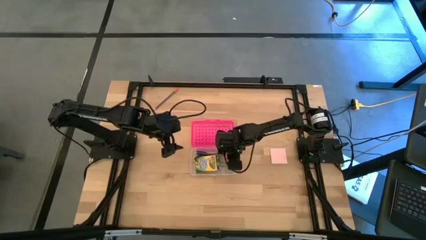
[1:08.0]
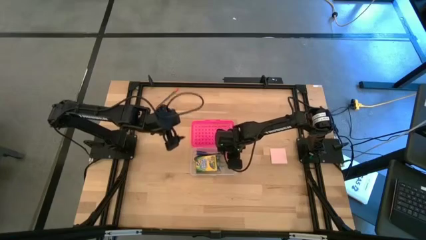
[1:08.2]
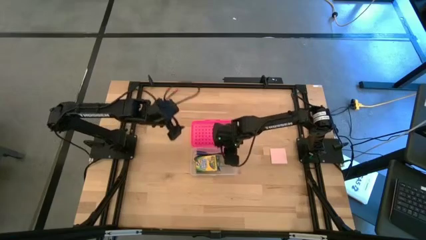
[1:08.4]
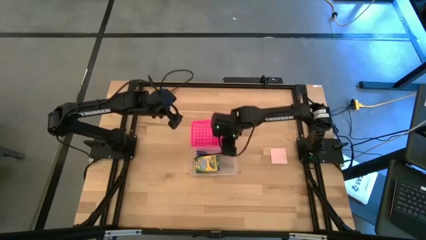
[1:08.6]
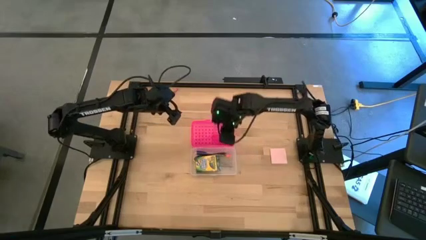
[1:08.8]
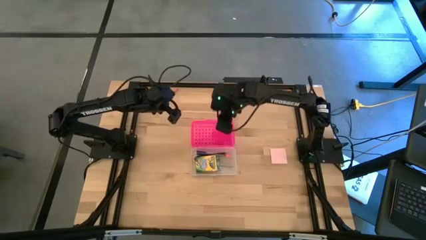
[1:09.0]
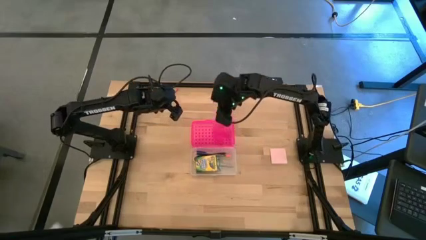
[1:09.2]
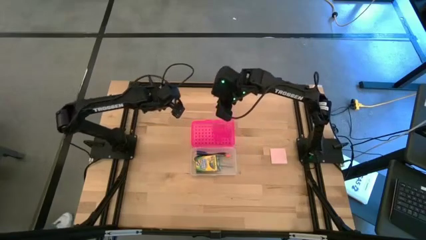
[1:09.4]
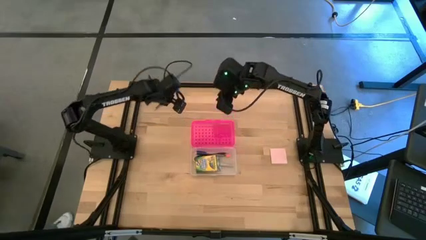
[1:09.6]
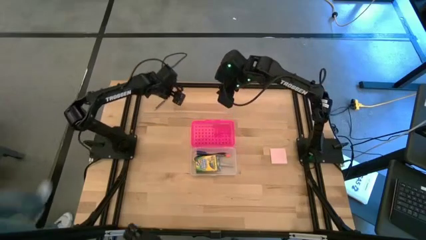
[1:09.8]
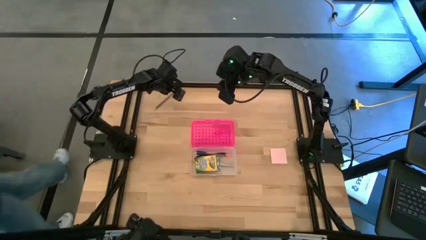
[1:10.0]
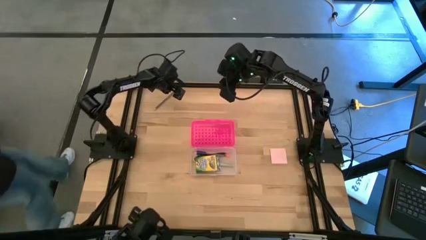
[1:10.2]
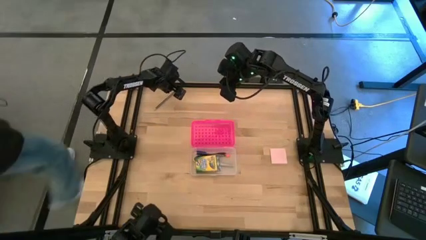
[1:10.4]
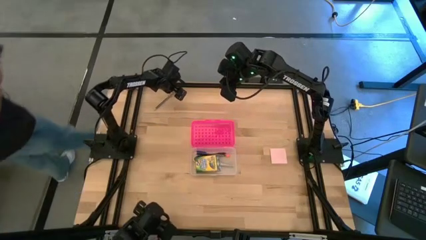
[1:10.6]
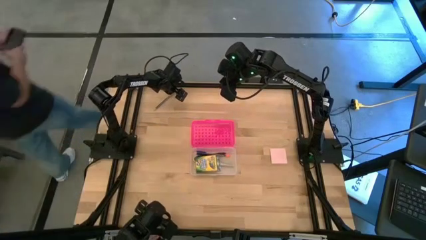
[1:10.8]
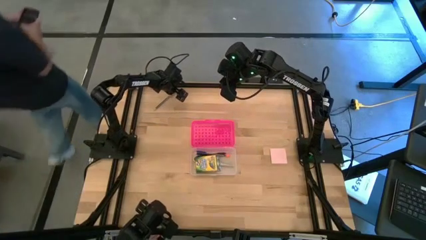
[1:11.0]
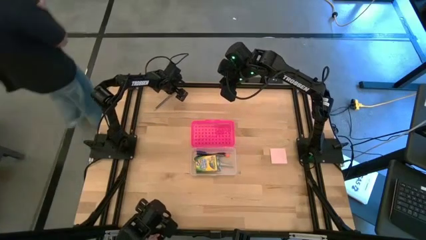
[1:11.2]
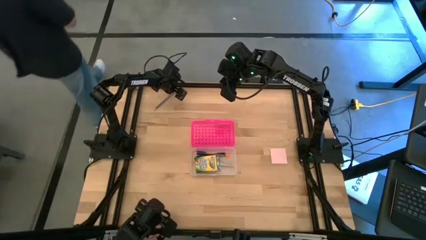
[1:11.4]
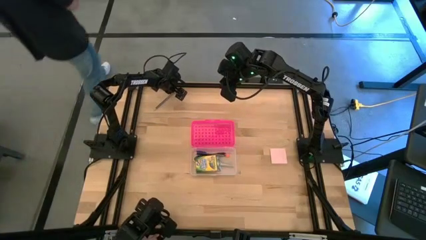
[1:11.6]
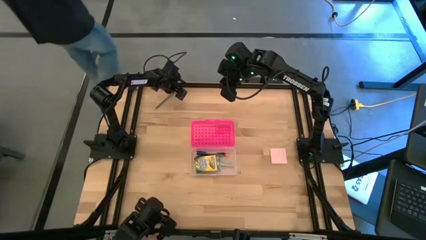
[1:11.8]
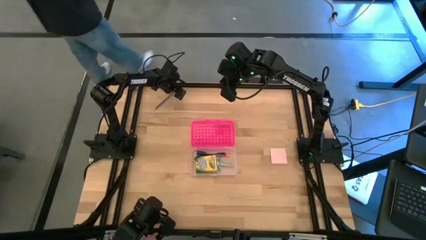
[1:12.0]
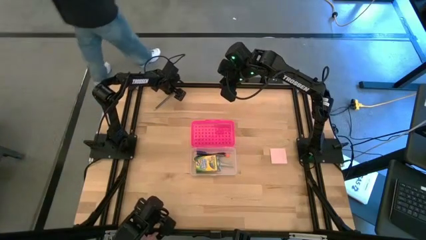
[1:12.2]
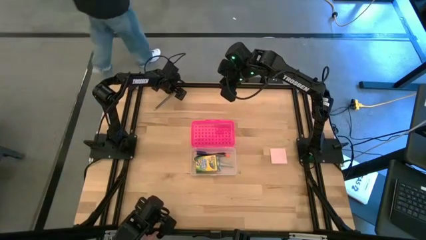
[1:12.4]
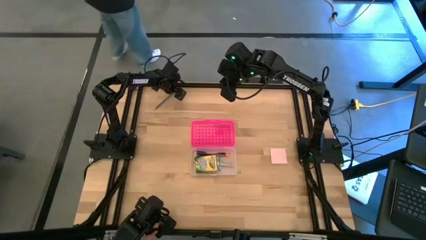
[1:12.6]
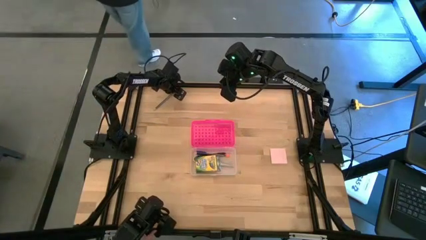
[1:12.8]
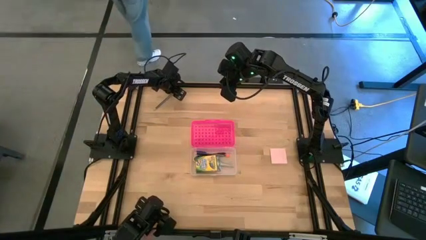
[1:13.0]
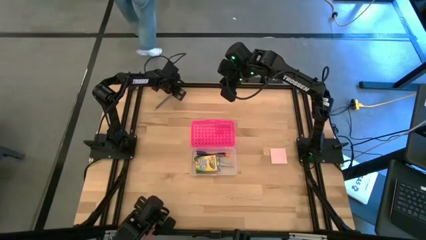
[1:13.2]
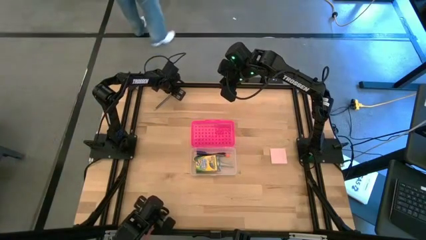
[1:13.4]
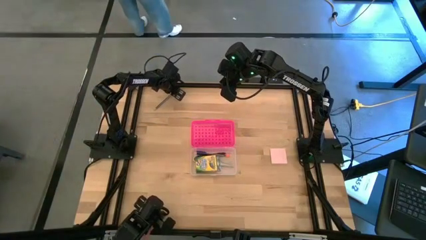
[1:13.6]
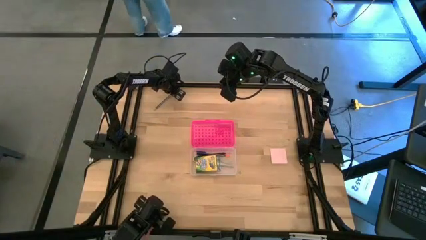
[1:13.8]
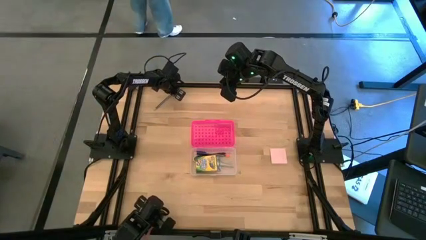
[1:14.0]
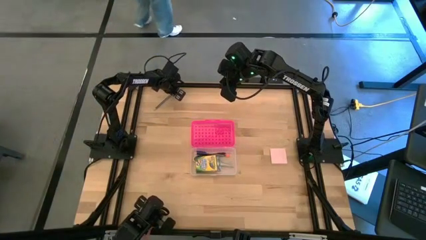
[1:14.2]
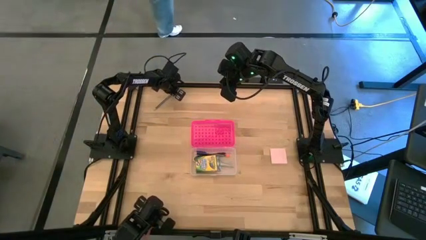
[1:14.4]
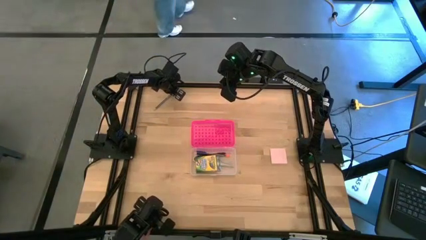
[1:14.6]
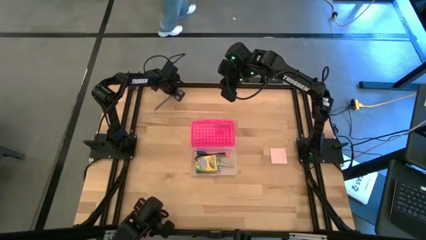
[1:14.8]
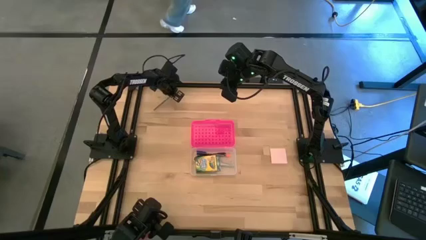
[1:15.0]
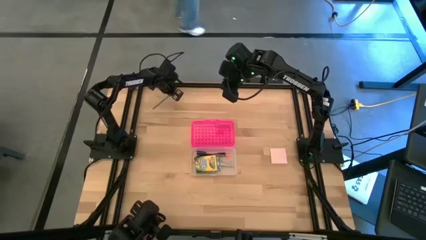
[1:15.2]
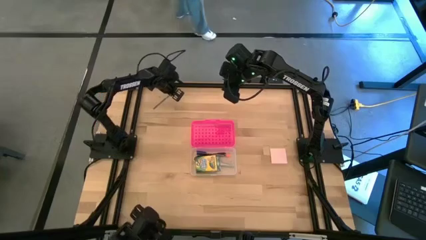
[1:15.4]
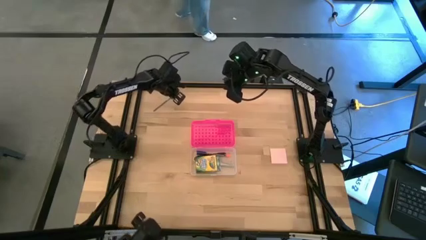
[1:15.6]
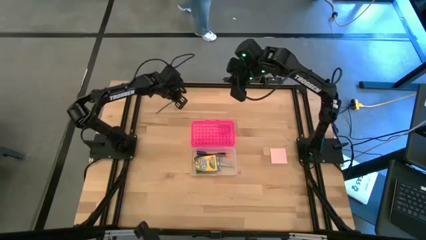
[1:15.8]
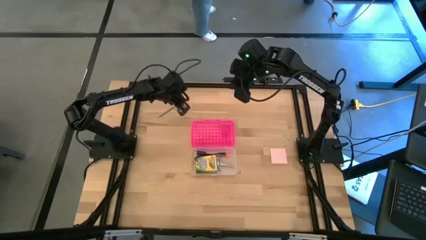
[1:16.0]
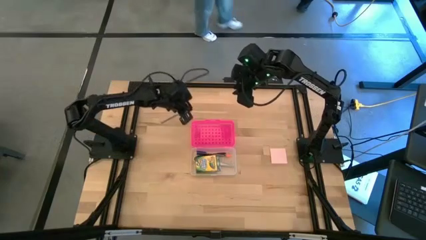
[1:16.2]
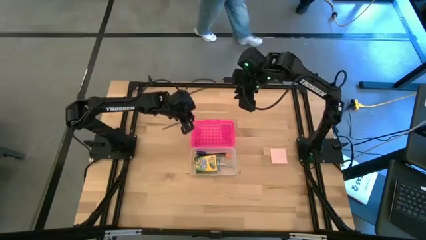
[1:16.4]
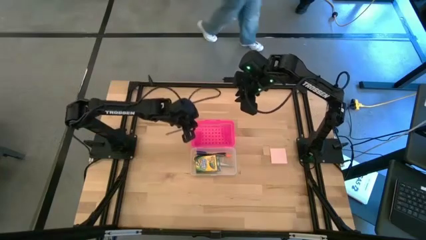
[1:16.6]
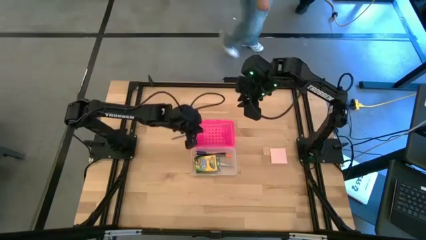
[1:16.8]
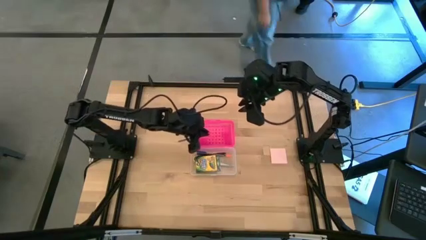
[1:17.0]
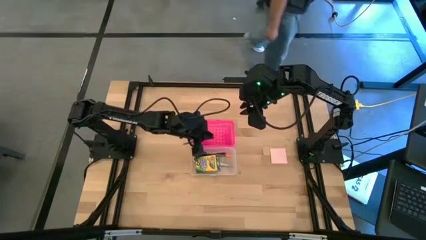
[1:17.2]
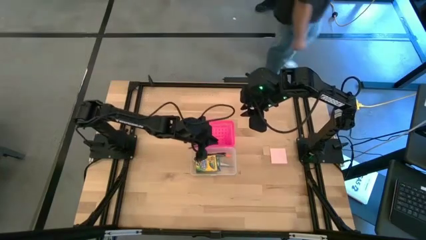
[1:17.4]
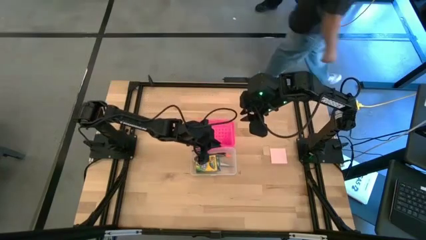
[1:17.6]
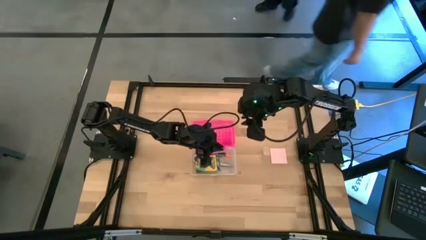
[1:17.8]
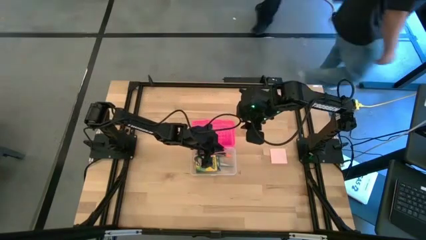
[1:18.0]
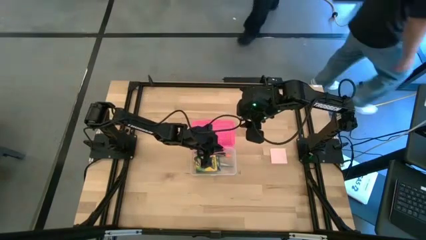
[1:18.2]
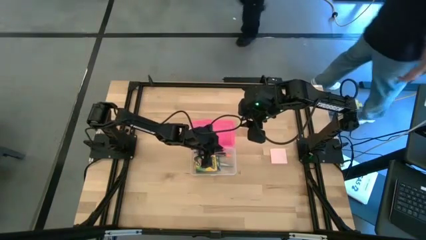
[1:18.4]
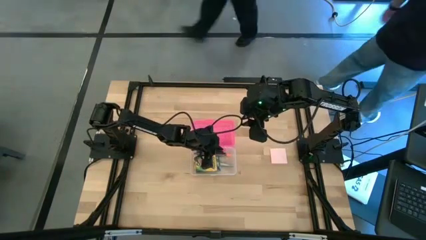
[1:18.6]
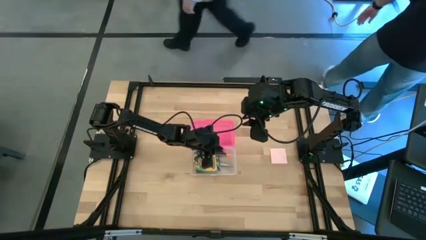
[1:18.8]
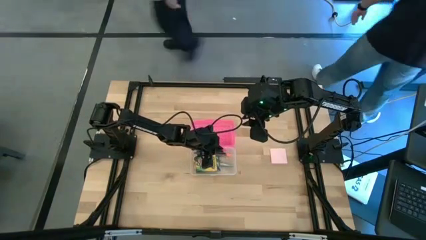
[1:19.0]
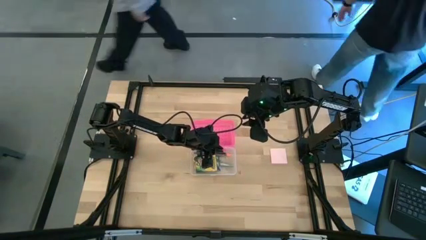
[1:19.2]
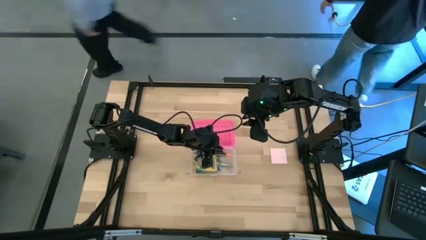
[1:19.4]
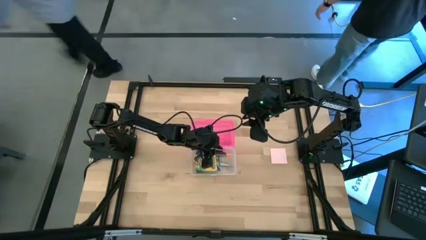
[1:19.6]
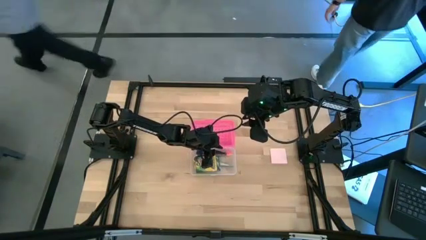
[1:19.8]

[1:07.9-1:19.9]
Task: Pack school essentials
Put the black pencil into the pencil case

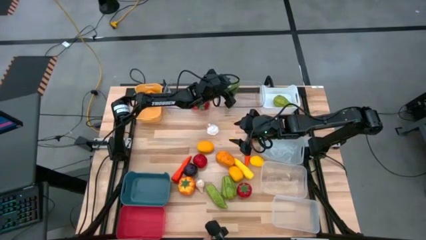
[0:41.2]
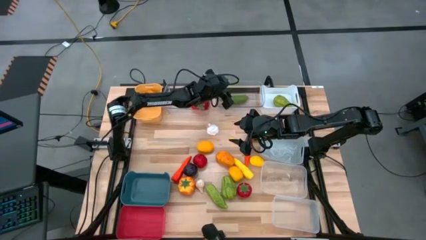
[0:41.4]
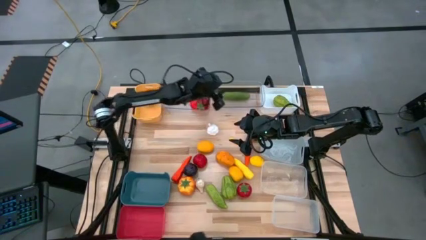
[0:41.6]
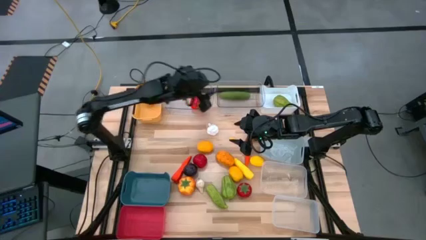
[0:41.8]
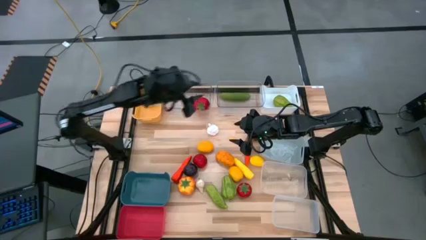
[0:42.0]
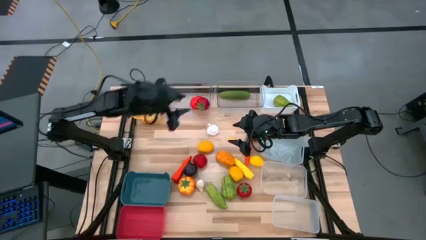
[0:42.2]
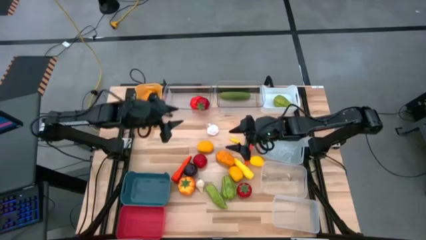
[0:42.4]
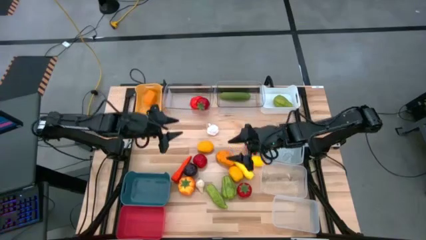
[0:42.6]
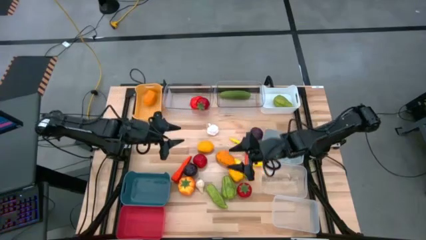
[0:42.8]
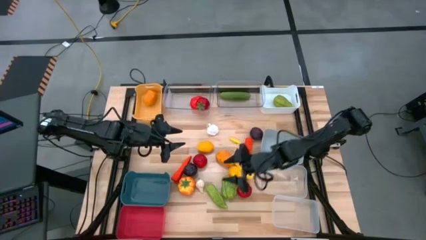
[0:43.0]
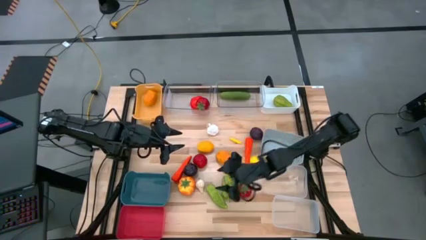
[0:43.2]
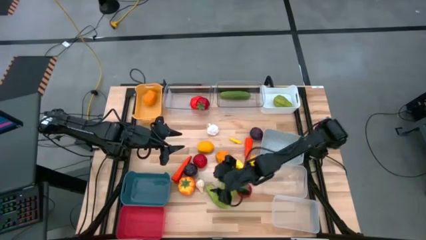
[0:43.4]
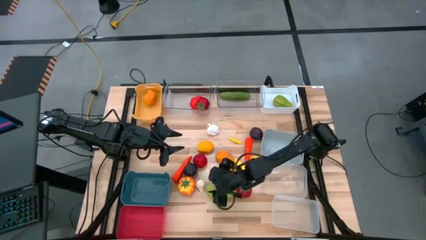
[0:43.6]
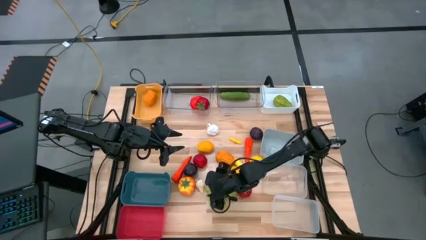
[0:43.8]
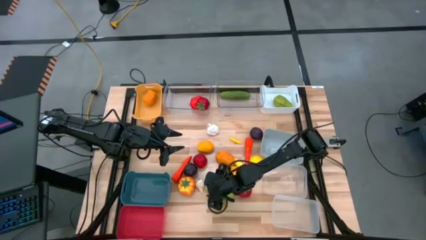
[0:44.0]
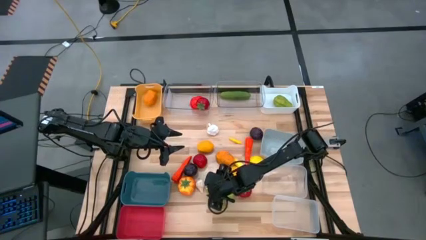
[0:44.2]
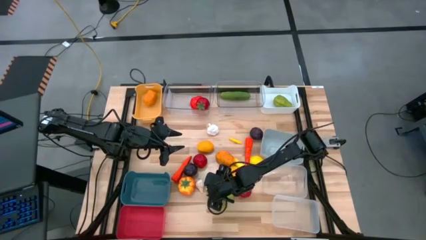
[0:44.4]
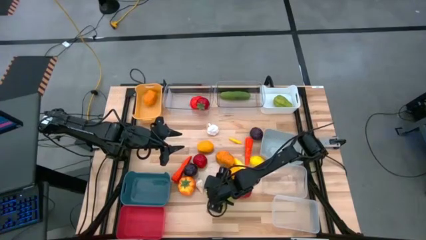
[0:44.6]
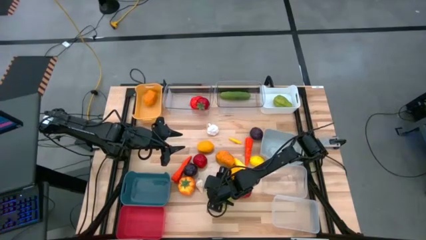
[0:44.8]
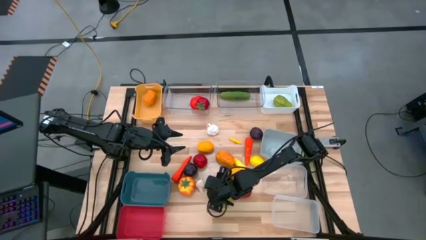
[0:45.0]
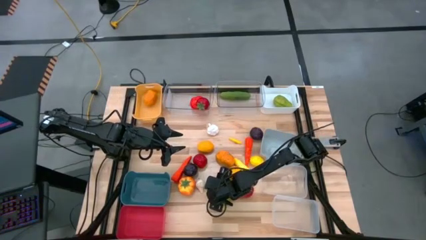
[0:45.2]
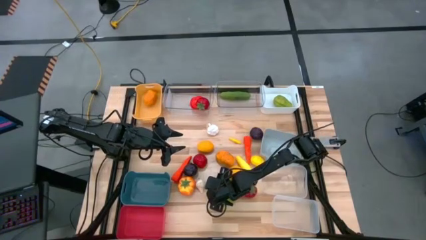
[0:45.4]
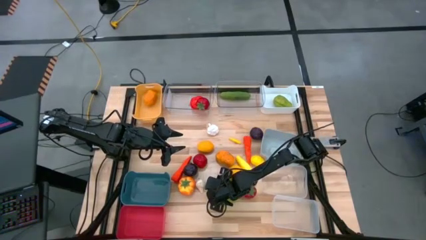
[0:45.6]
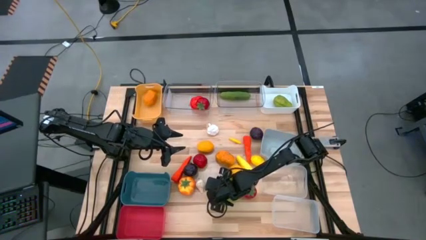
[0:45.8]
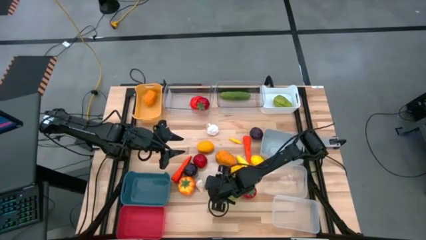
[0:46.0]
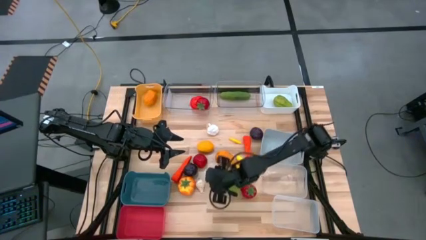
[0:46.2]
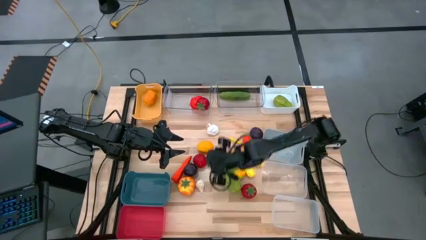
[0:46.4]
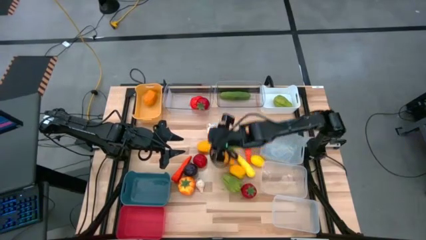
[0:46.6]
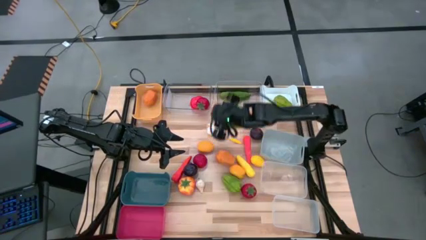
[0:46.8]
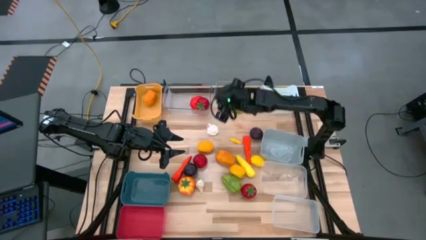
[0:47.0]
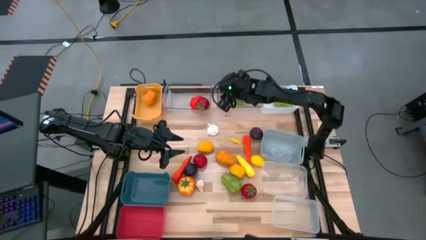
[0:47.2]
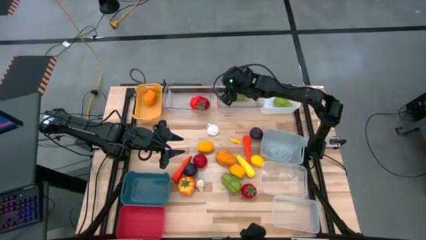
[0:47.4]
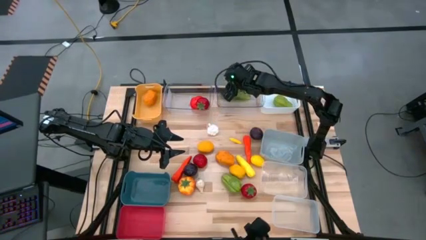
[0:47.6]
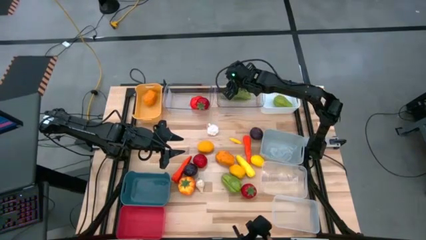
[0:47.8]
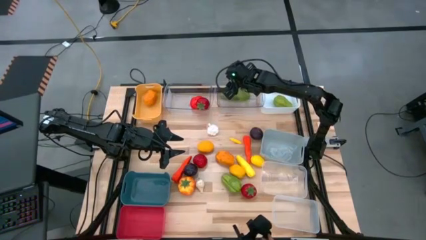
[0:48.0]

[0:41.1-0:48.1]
Task: Sort produce into baskets
Put the green cucumber into the right transparent bin
